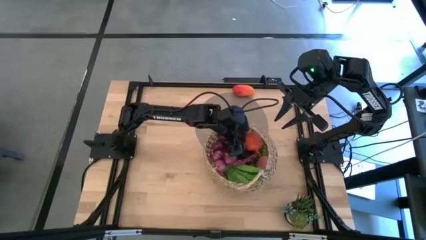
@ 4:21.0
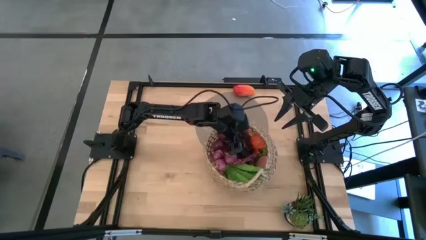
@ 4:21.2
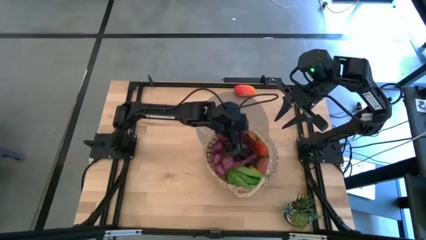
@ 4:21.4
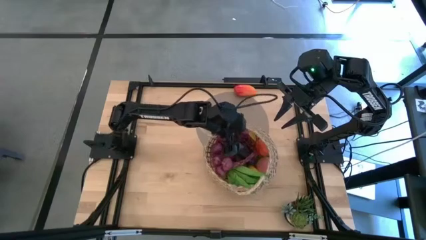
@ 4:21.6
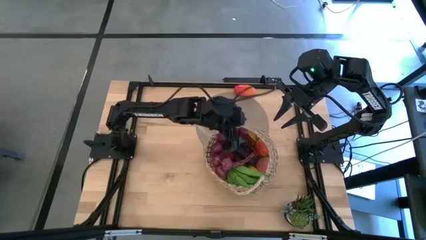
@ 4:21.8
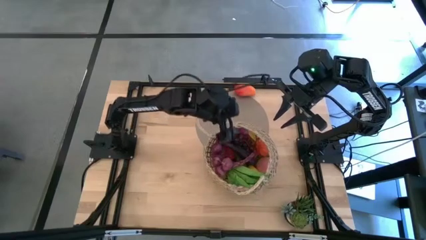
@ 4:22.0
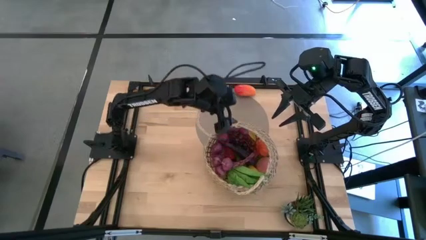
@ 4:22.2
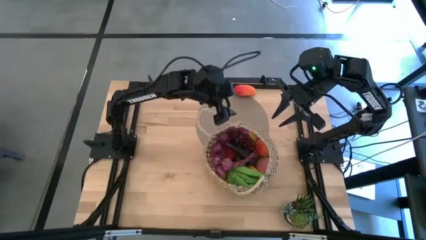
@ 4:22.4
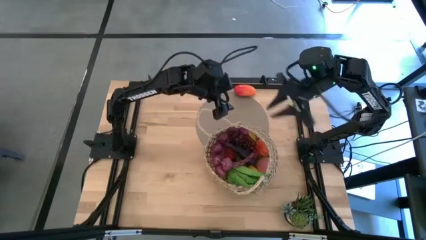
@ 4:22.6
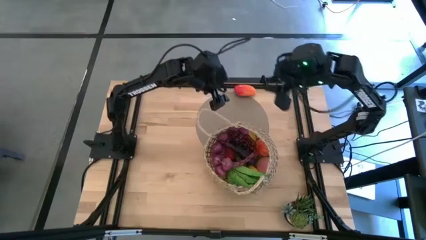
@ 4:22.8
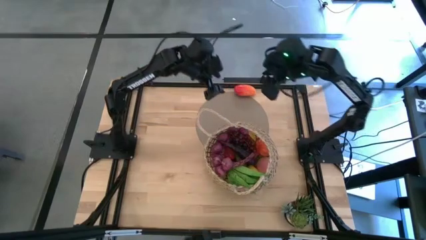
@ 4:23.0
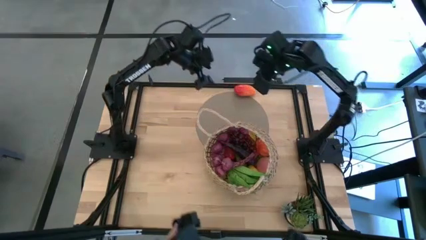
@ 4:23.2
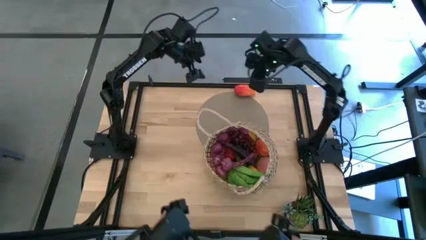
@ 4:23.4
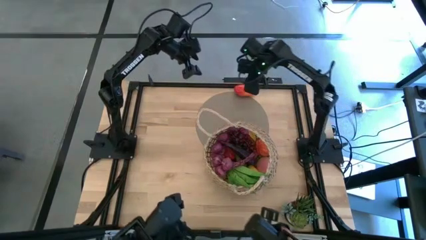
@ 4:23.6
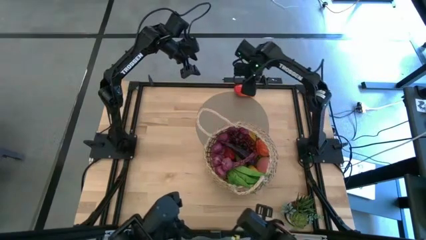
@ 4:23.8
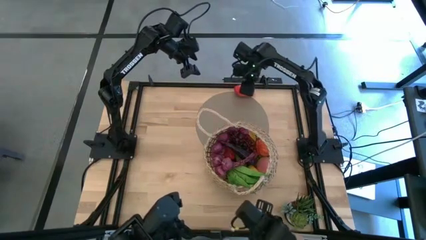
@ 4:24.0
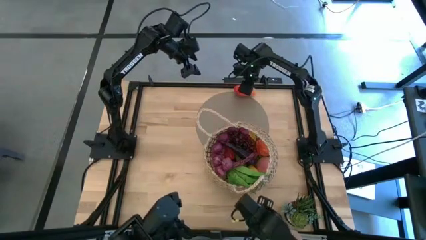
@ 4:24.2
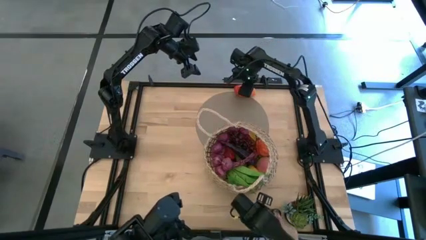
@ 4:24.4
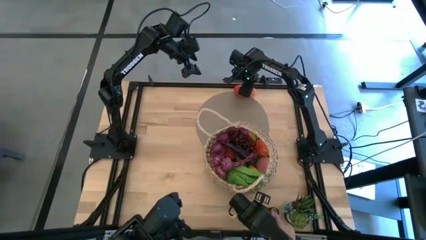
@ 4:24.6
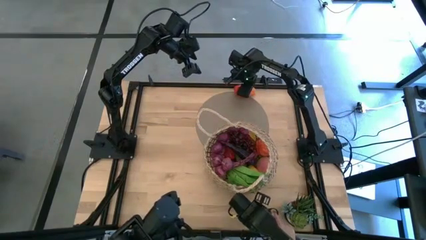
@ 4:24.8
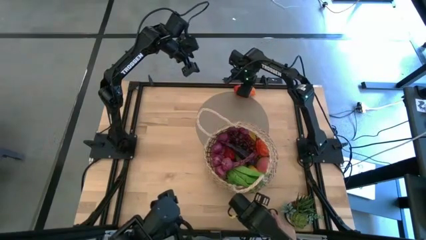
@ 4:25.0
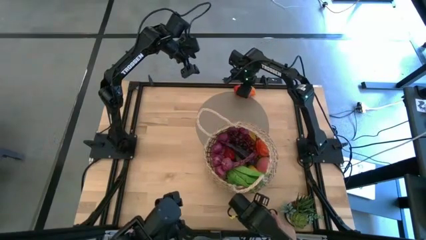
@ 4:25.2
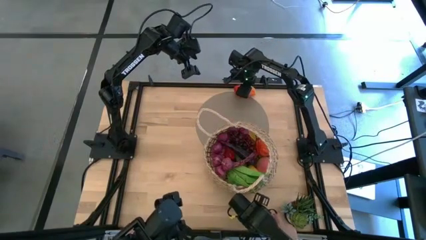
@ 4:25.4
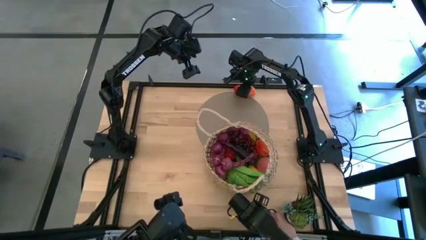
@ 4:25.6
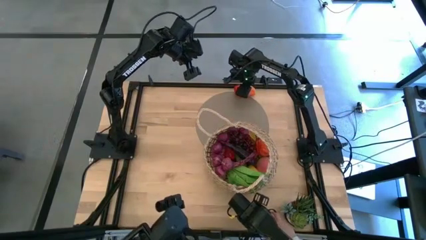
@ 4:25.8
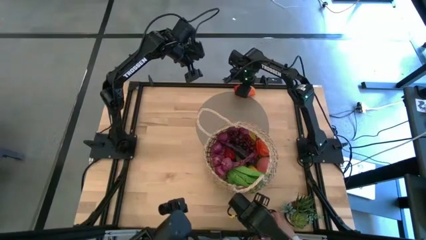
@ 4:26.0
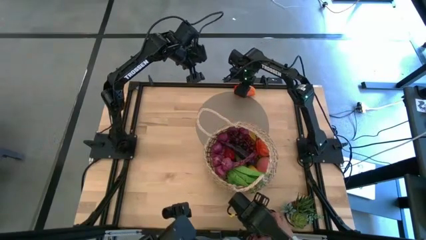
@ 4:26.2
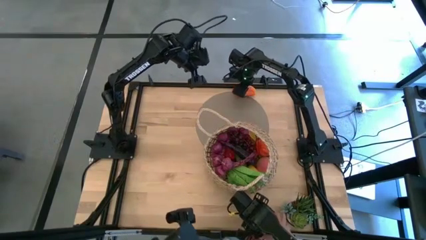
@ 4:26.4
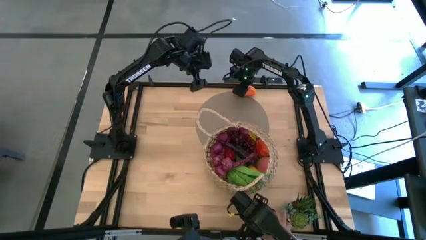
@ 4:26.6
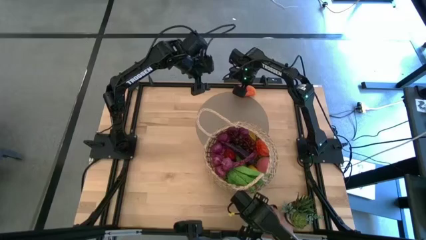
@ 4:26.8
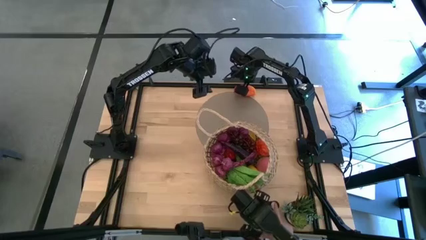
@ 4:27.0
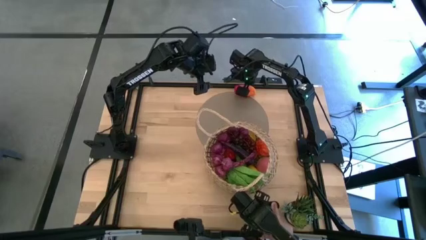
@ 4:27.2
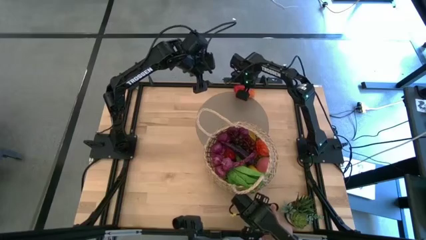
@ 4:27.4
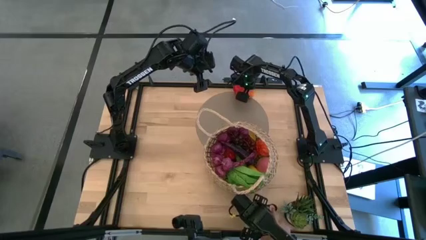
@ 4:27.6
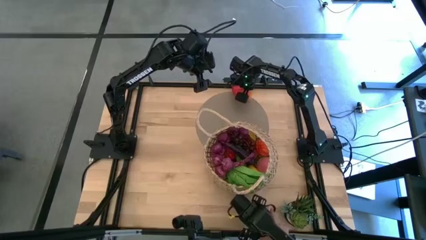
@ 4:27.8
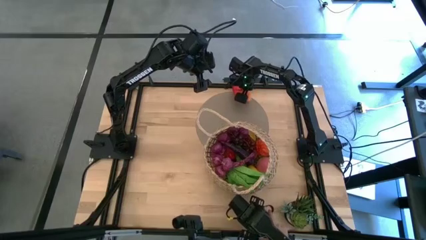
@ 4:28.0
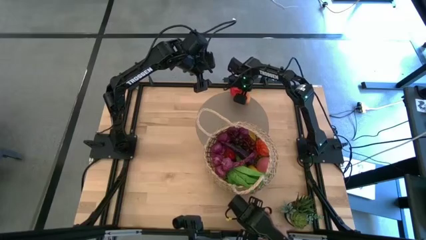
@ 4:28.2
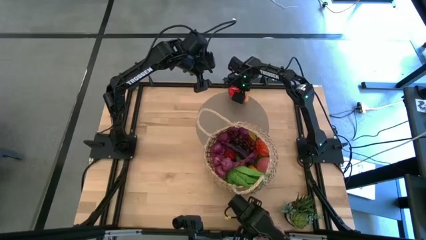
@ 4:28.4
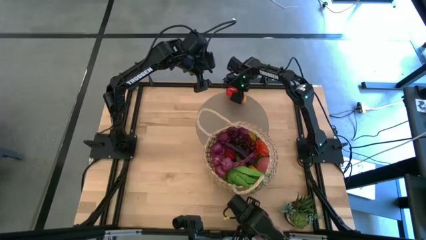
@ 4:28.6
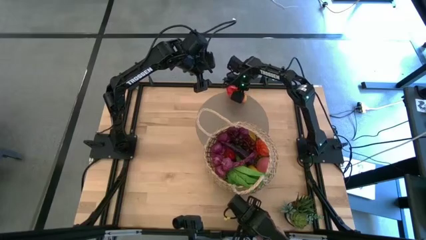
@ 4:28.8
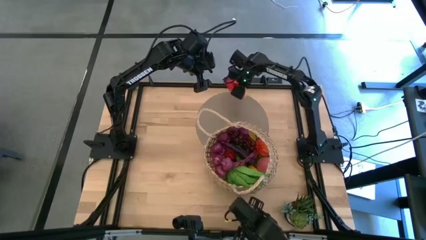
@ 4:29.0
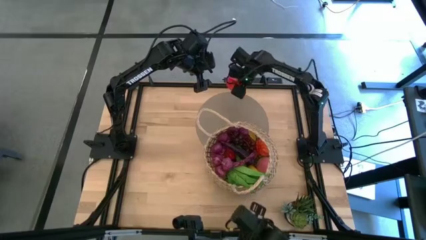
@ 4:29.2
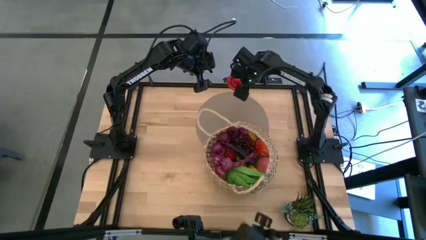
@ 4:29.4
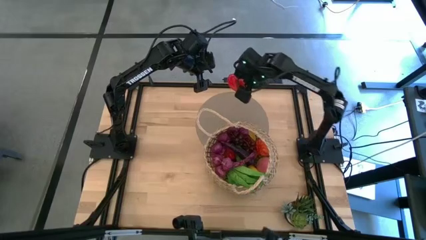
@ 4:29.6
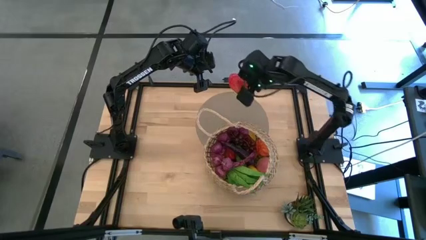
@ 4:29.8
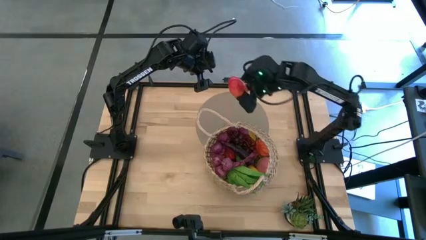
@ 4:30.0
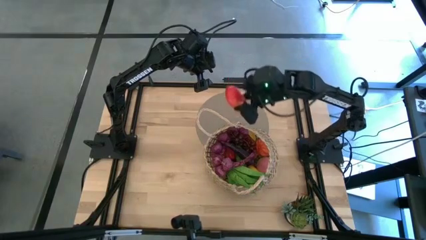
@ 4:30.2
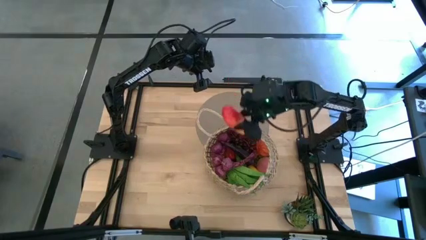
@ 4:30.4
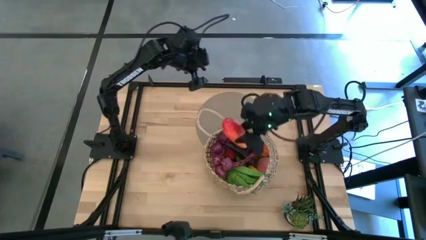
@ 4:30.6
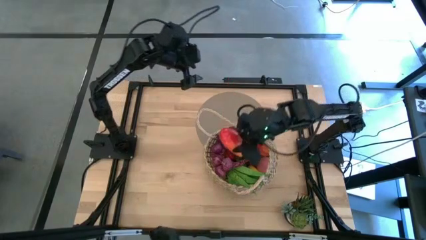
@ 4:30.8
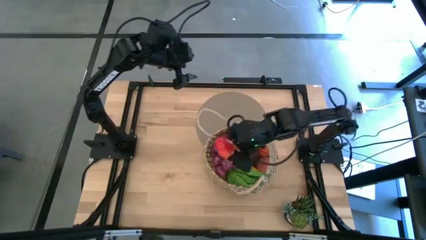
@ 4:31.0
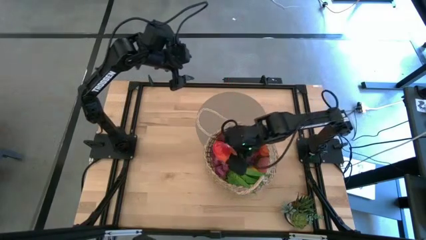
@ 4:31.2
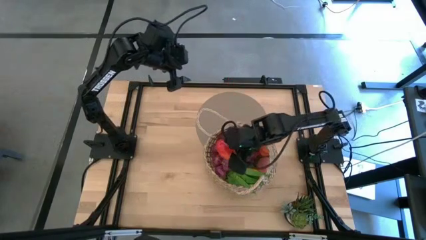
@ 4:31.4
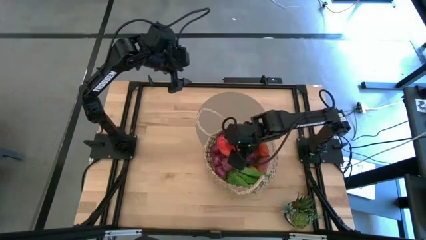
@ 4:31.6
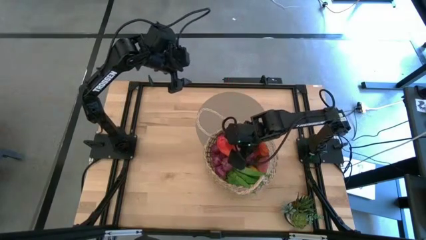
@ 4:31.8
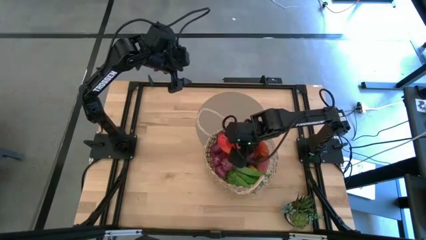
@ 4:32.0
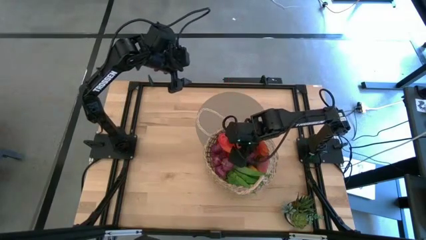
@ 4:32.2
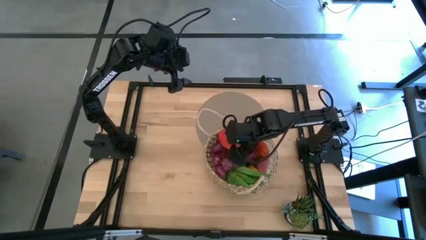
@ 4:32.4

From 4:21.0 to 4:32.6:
Task: Build produce basket
Put the red mango into the brown basket
